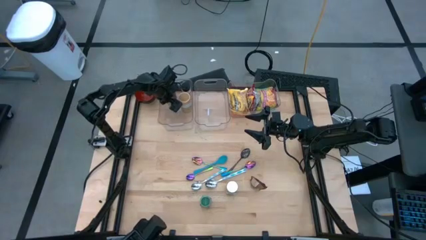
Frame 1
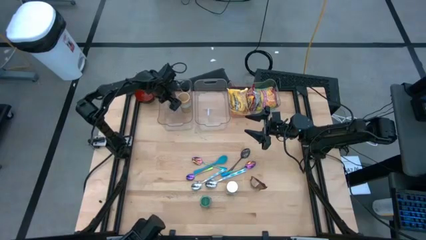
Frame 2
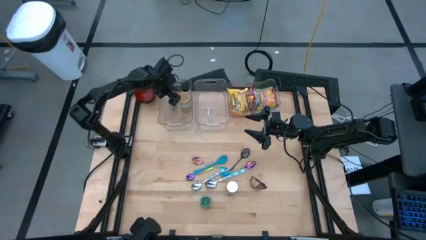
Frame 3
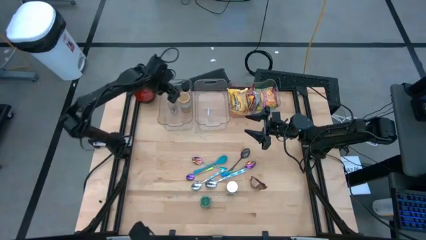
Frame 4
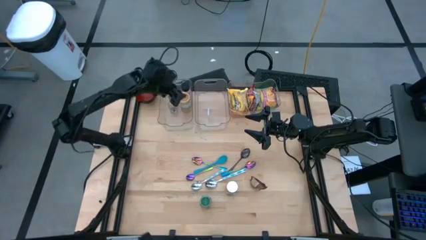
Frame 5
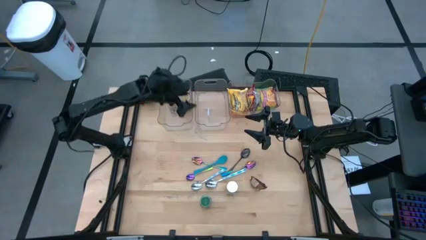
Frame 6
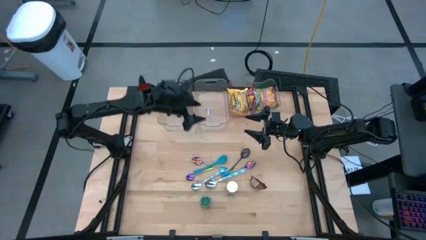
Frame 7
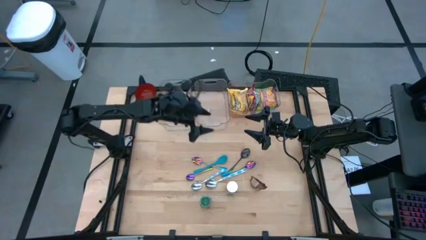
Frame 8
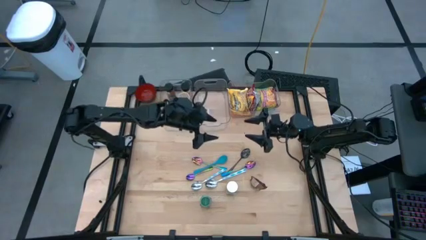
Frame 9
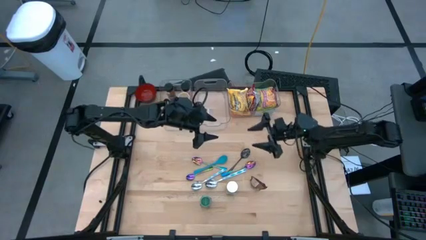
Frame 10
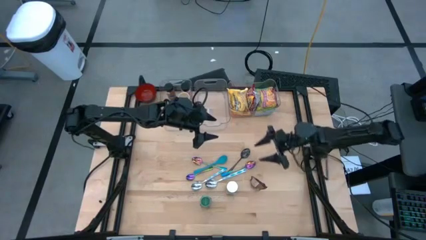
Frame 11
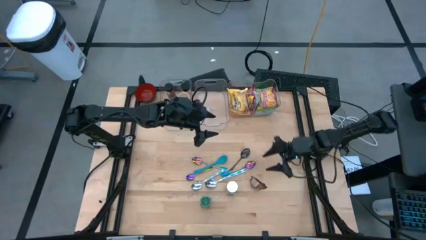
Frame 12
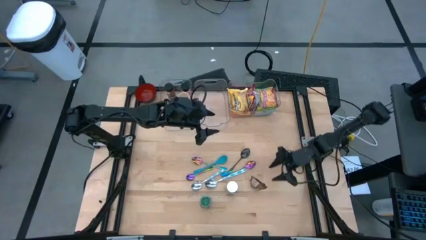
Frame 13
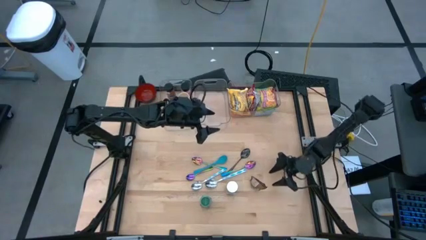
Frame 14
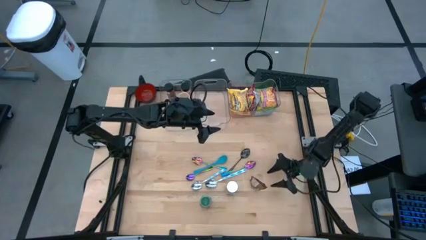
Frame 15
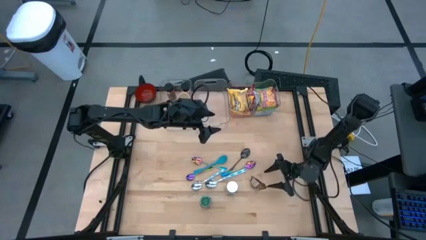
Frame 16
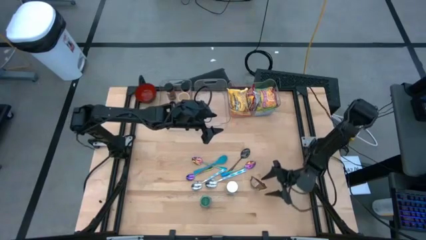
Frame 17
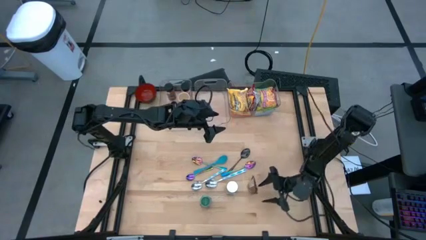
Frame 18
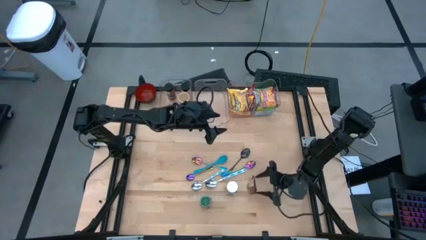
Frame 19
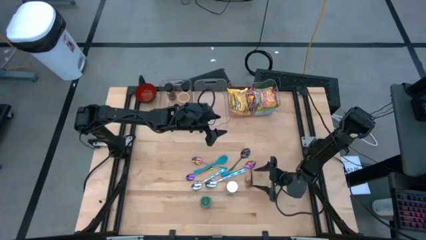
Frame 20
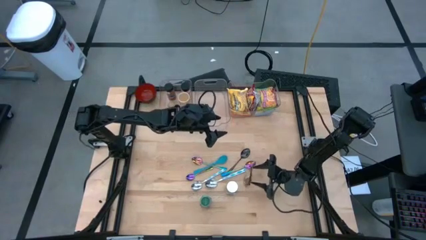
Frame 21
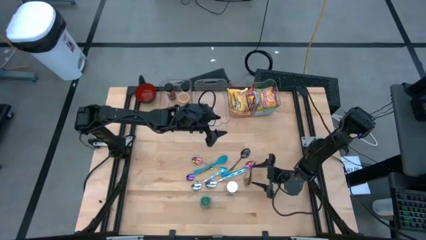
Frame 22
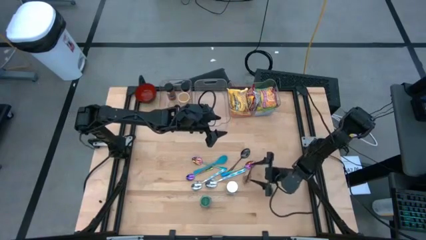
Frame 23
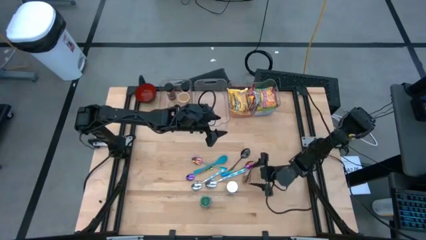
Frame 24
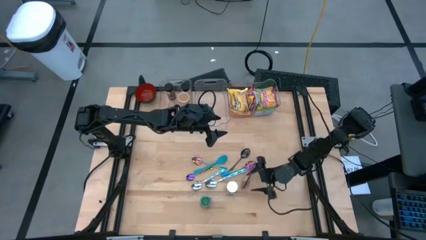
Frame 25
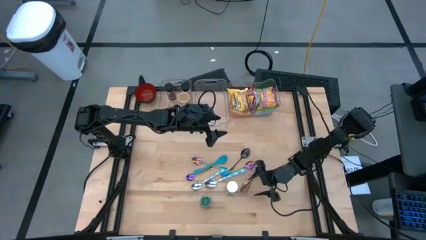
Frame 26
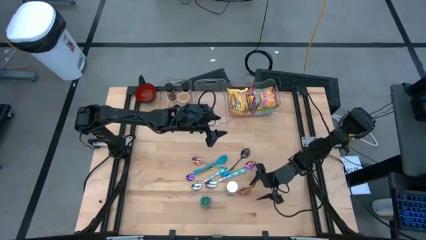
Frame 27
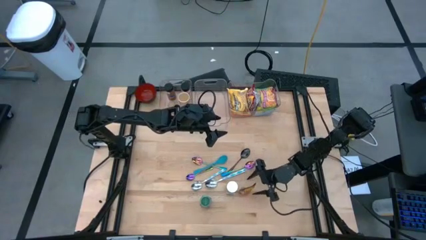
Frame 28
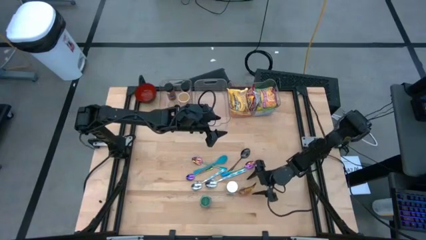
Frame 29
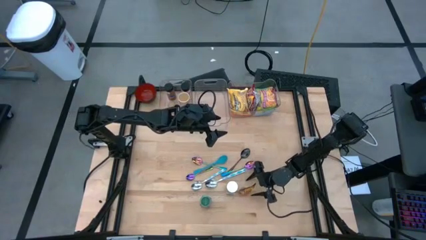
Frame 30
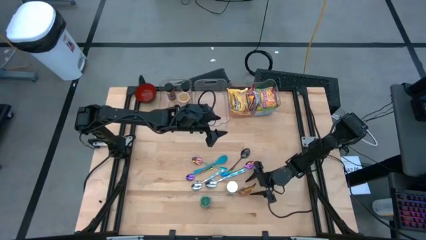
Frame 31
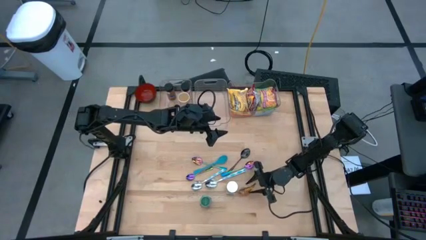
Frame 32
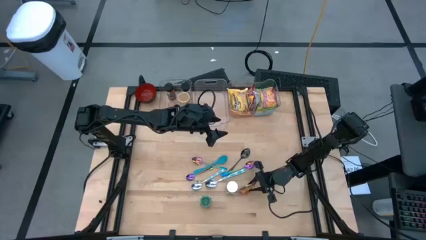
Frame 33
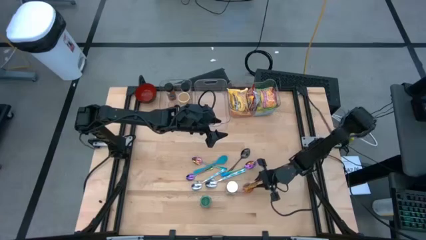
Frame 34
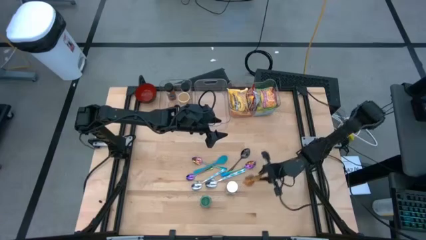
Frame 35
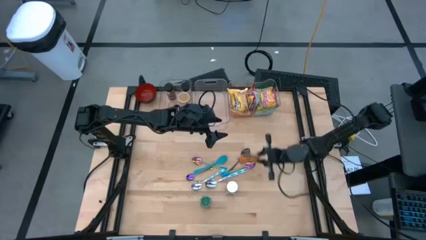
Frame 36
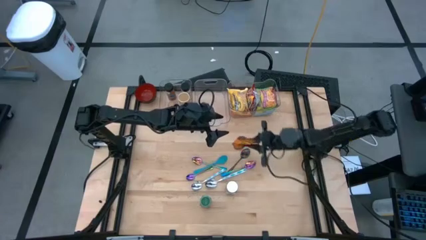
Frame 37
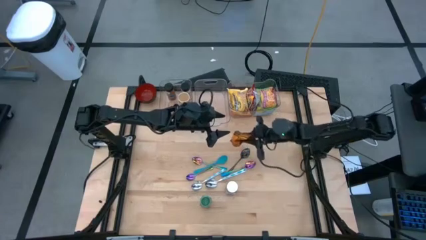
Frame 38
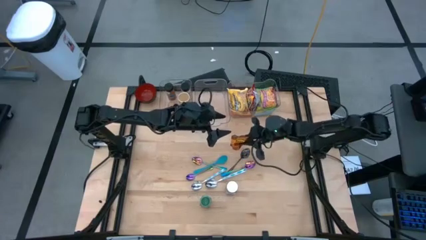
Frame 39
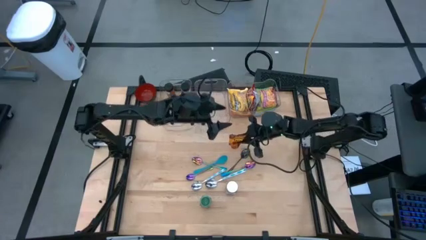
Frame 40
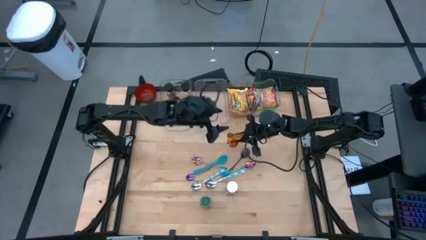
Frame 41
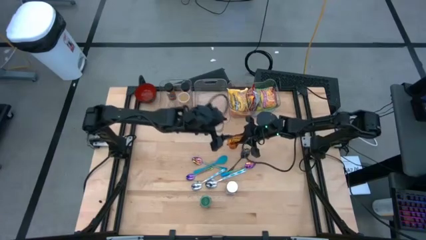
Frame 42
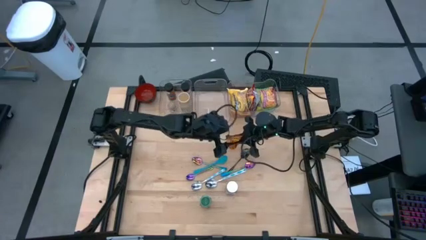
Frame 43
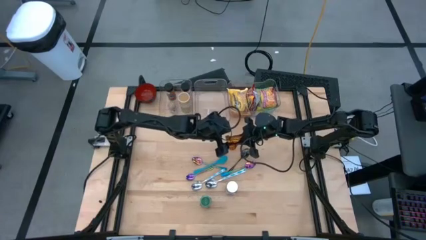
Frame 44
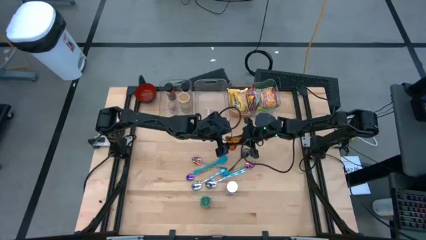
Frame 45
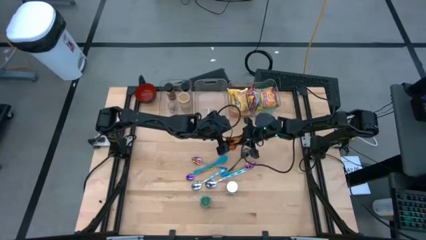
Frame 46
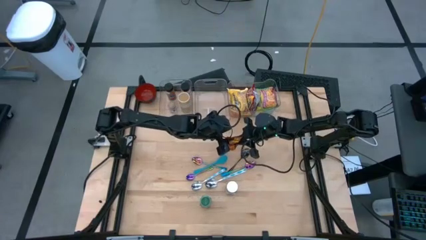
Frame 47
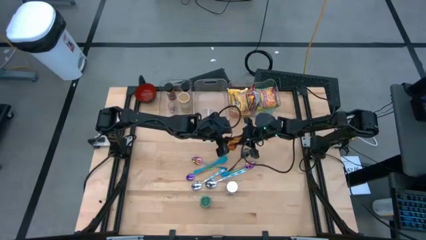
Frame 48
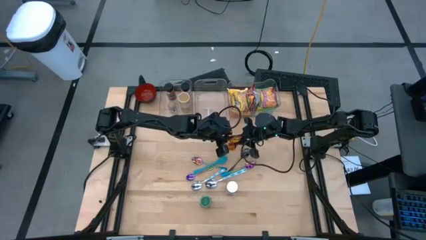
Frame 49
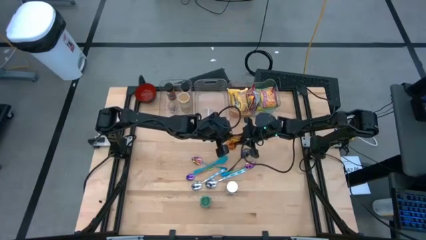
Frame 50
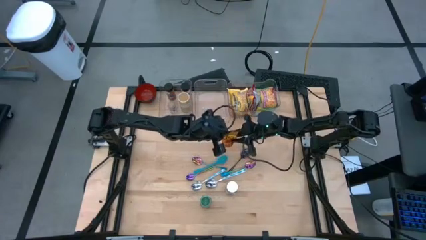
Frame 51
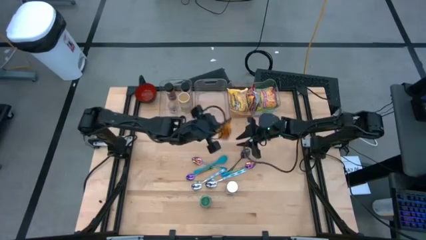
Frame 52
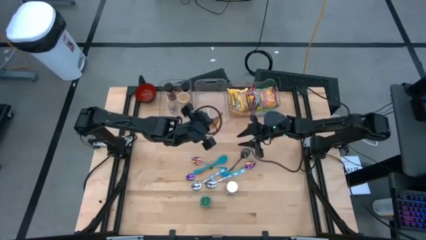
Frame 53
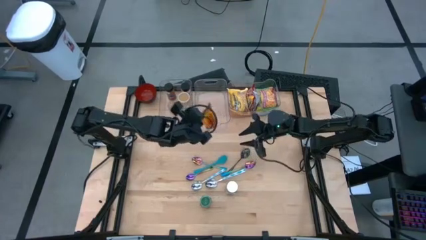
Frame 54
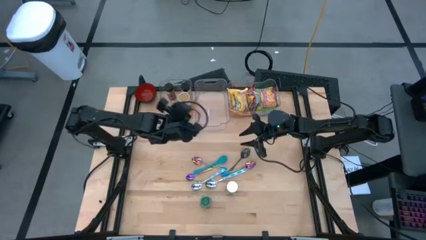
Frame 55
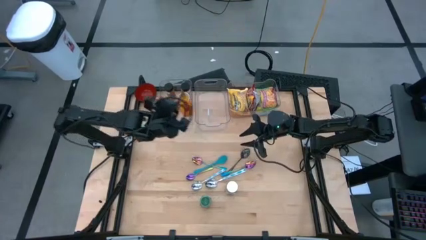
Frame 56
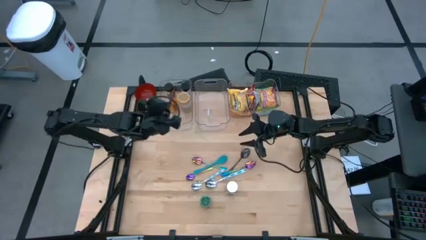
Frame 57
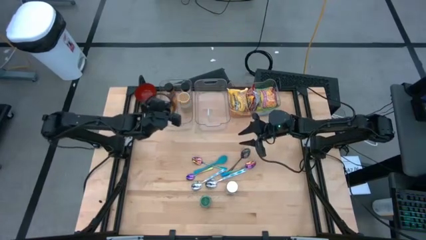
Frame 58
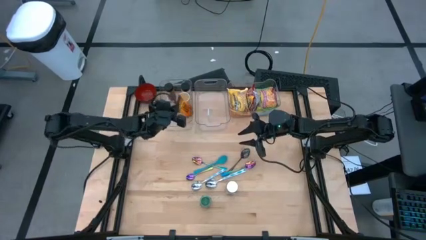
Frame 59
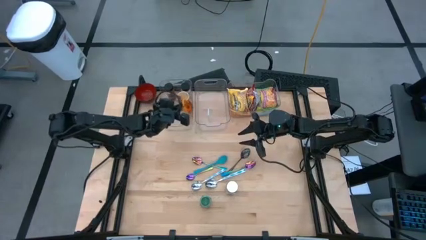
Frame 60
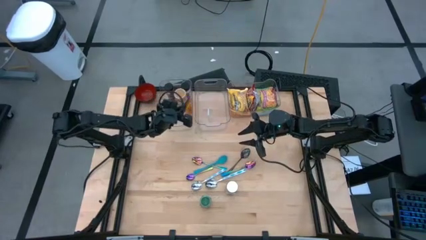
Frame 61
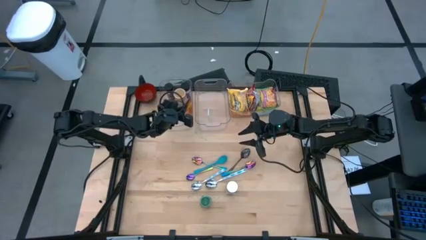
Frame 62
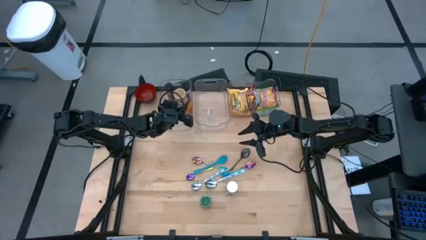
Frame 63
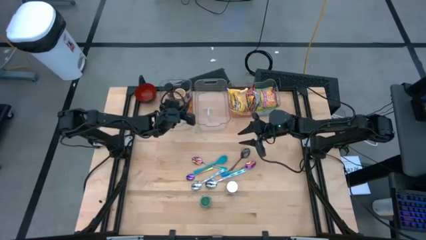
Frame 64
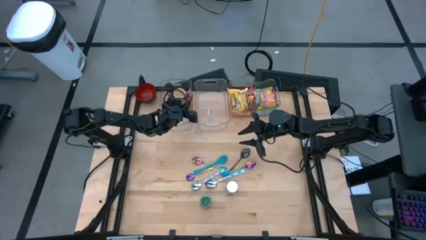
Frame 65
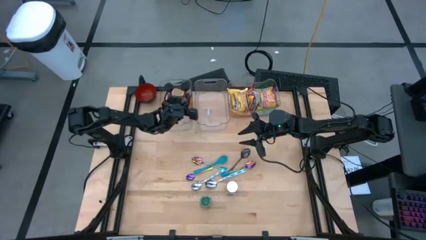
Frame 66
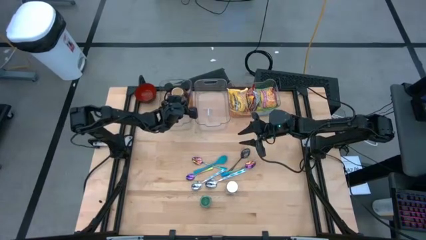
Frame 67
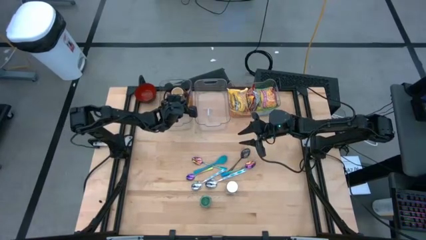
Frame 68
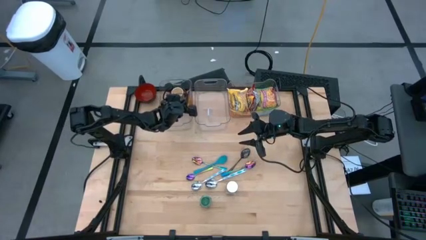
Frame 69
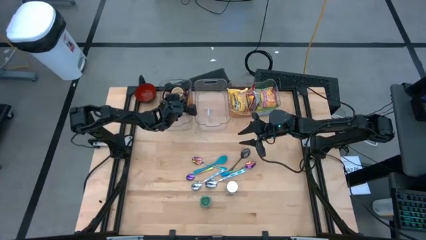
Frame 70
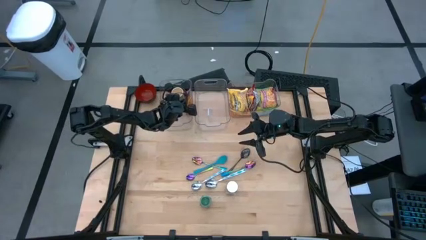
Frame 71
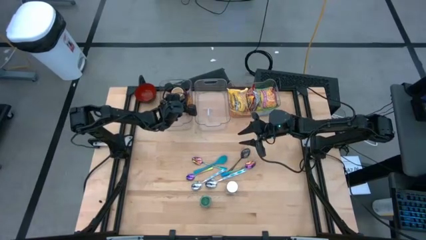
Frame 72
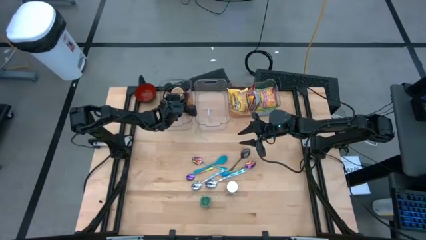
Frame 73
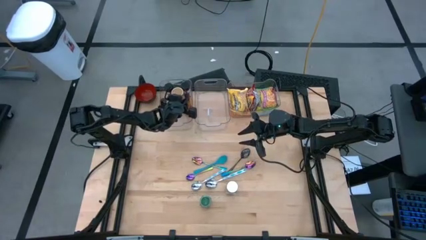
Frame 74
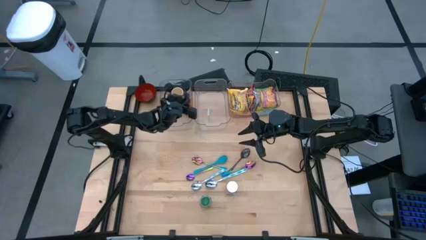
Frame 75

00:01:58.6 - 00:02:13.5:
Task: Pick & Place Food Item
Put the orange seasoning bag into the left transparent bin

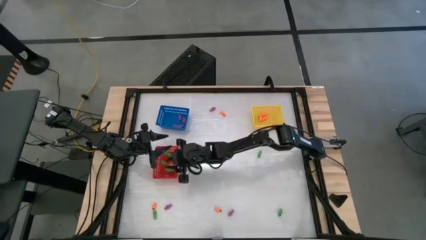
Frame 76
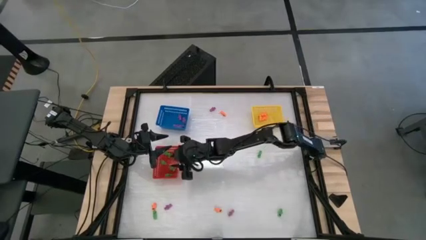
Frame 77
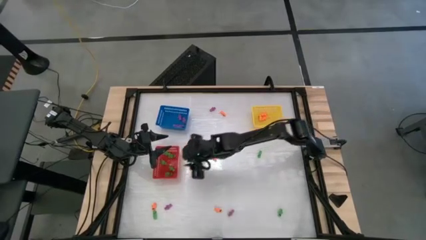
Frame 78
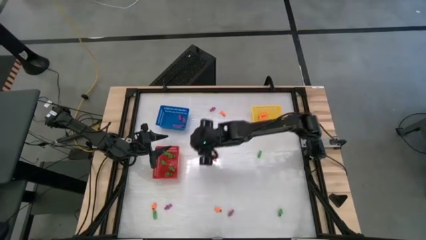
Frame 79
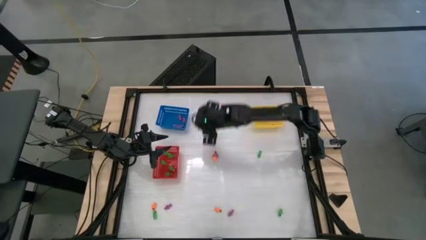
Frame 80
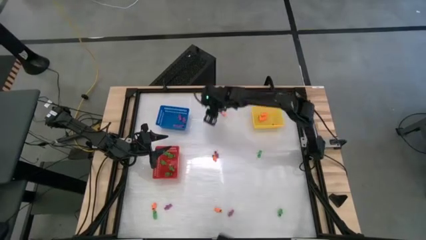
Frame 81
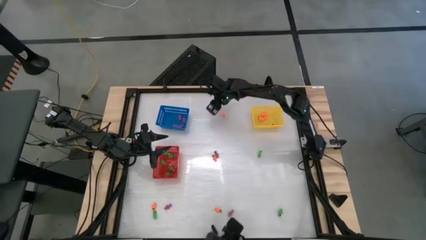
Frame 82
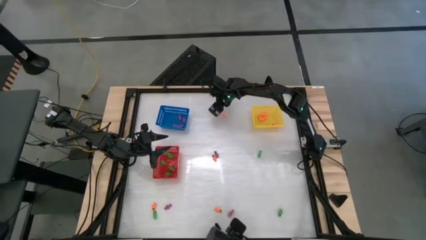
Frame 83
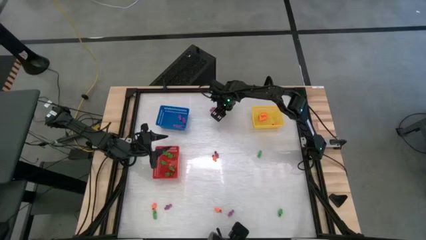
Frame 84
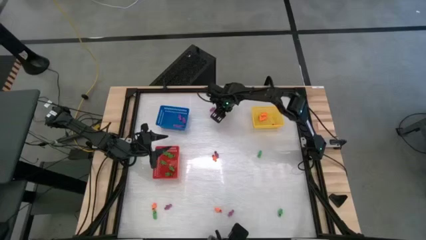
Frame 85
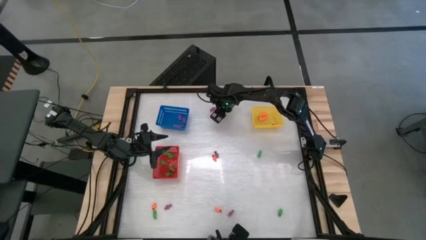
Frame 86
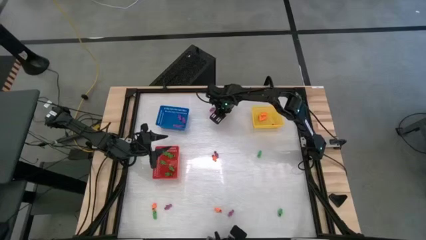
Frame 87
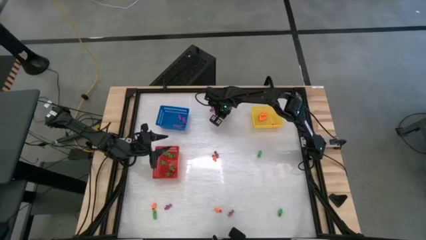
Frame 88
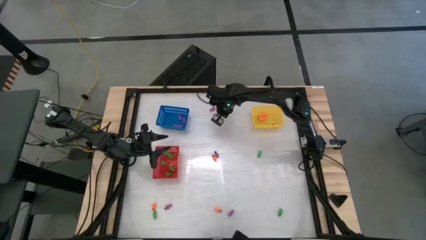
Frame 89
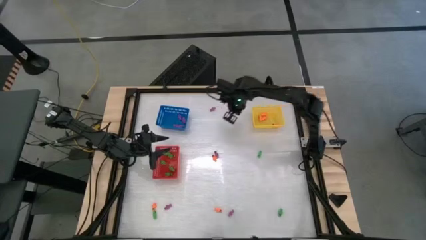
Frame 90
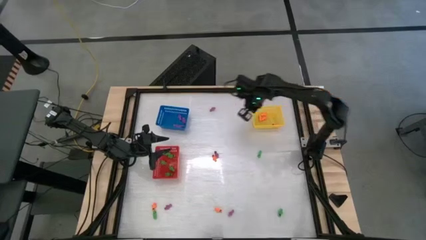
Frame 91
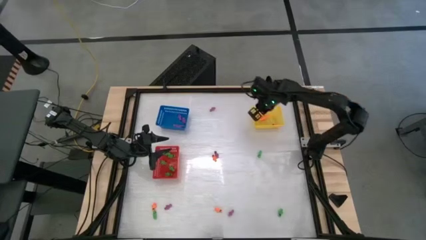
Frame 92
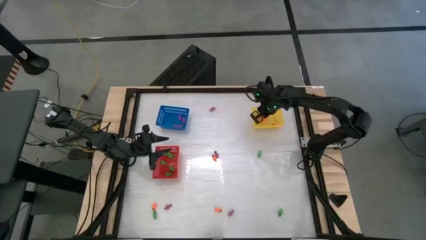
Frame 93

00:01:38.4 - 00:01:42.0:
Task: Sort Halloween decoration
Put the orange skeleton toy into the yellow bin
